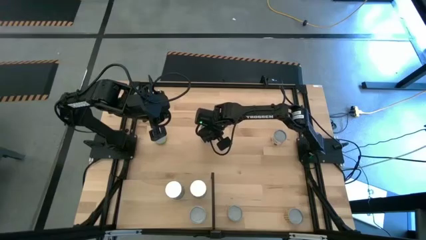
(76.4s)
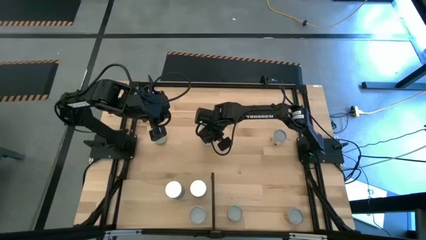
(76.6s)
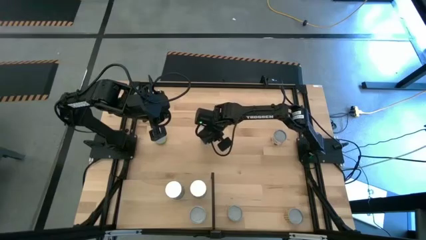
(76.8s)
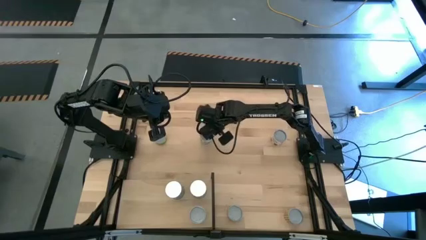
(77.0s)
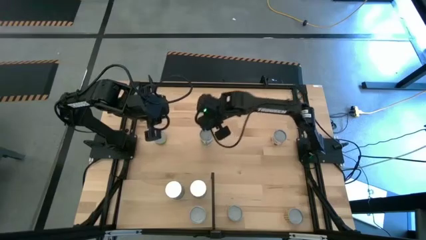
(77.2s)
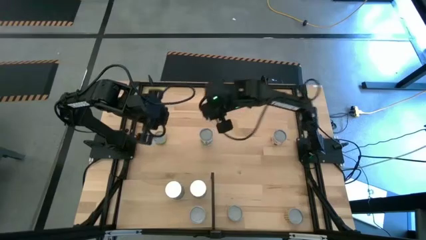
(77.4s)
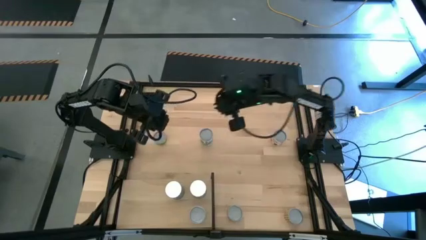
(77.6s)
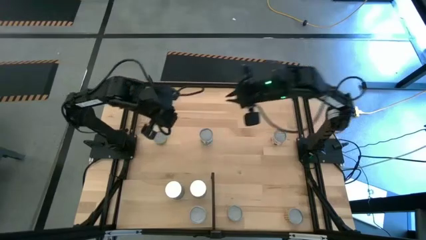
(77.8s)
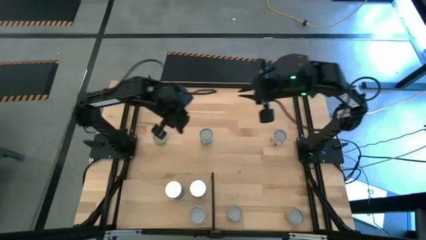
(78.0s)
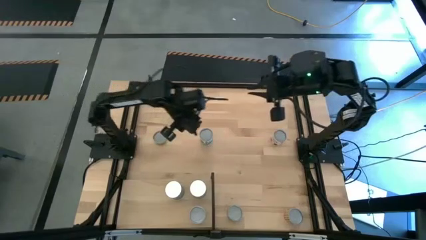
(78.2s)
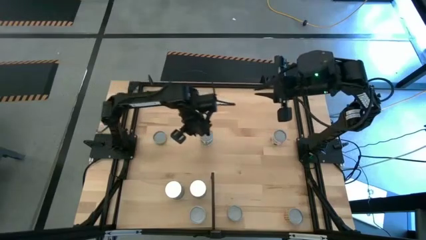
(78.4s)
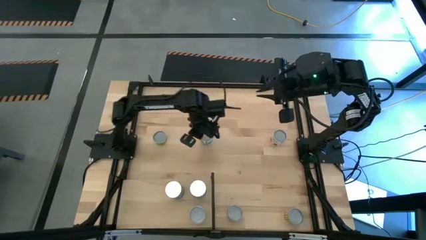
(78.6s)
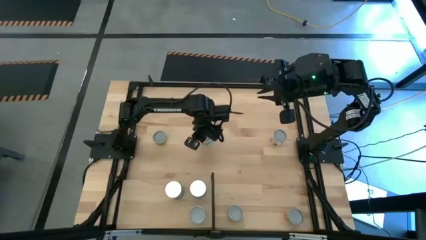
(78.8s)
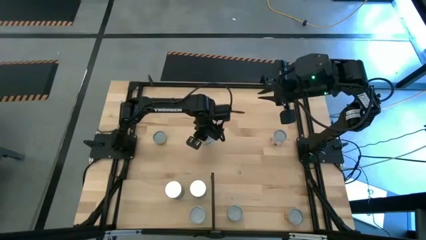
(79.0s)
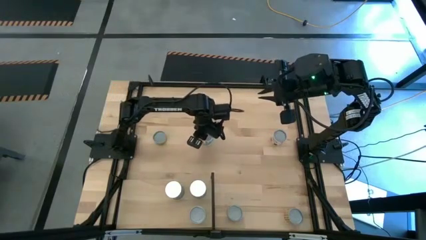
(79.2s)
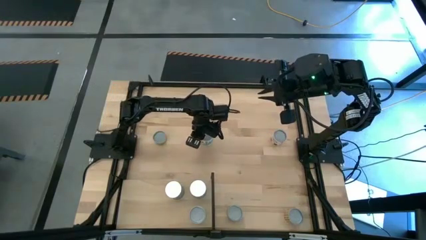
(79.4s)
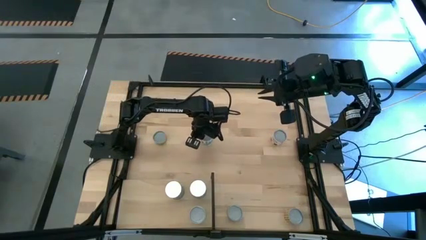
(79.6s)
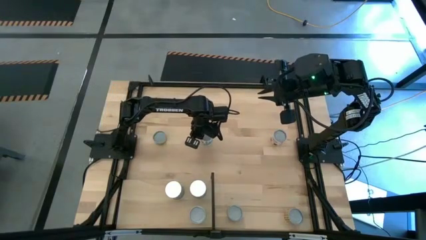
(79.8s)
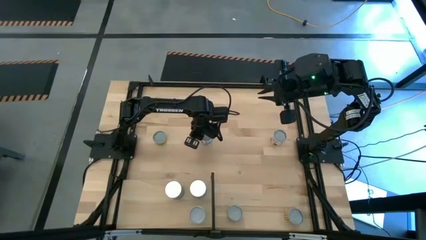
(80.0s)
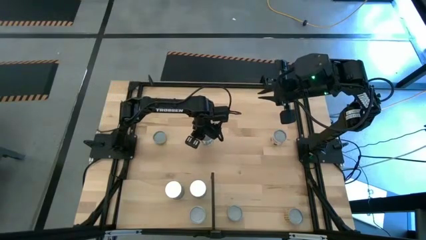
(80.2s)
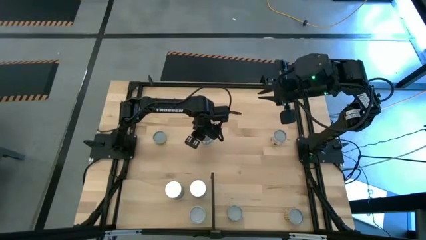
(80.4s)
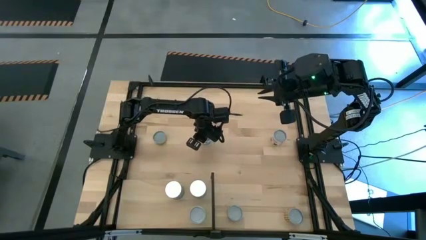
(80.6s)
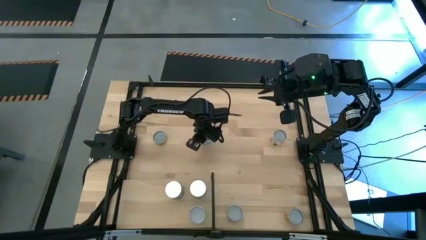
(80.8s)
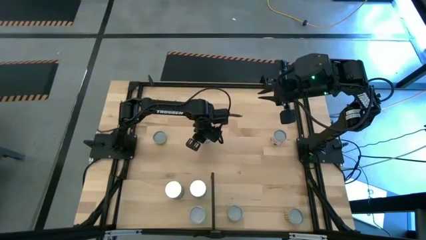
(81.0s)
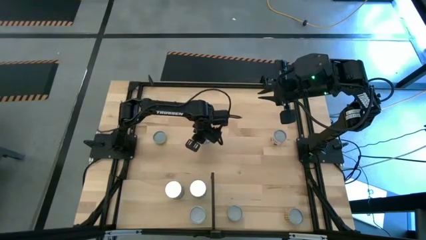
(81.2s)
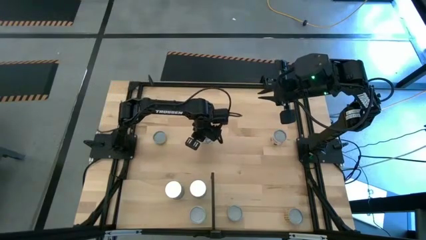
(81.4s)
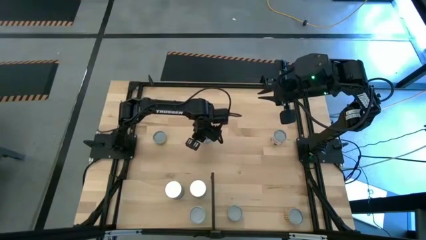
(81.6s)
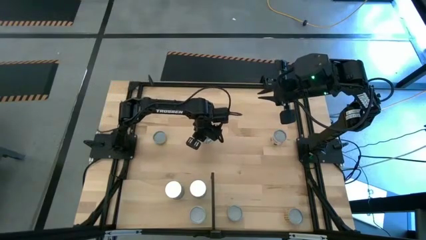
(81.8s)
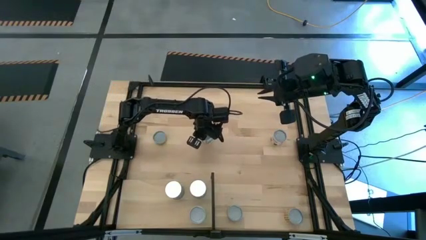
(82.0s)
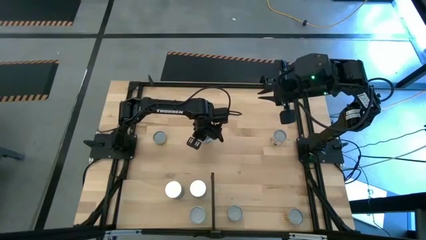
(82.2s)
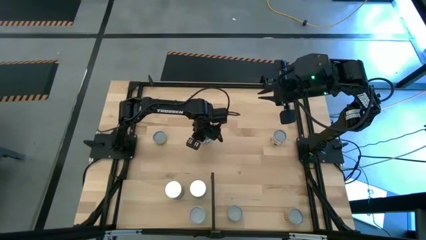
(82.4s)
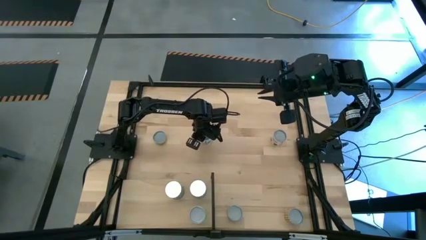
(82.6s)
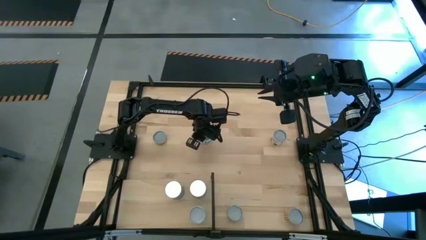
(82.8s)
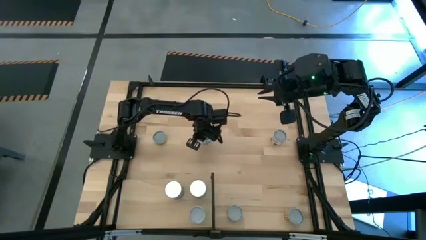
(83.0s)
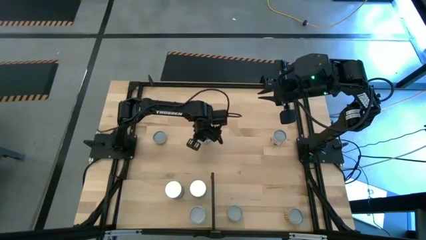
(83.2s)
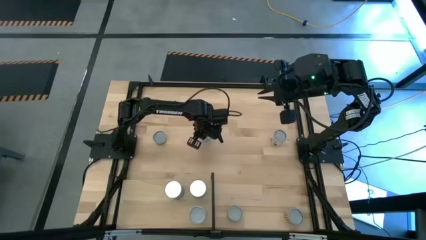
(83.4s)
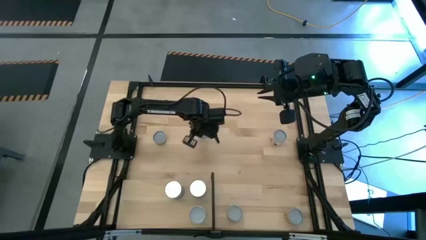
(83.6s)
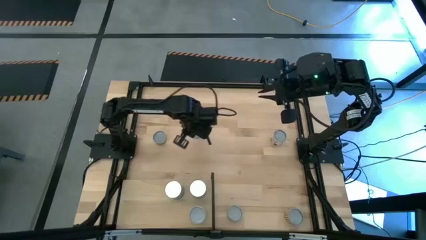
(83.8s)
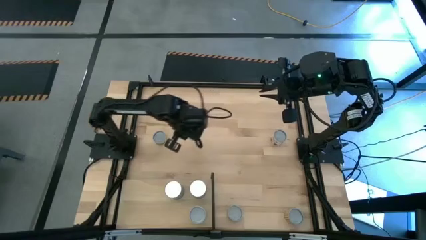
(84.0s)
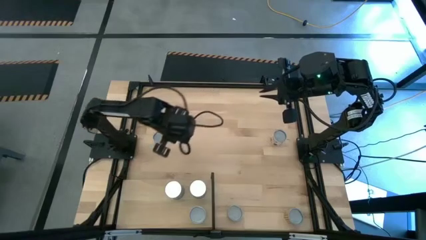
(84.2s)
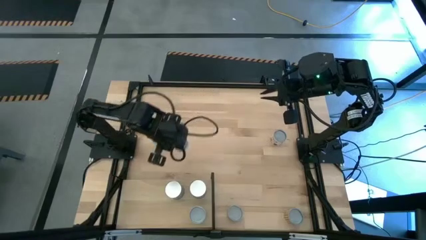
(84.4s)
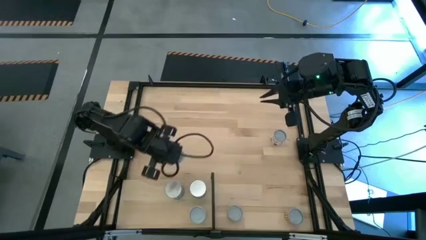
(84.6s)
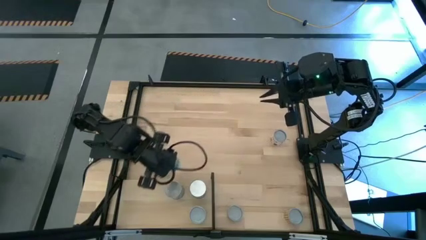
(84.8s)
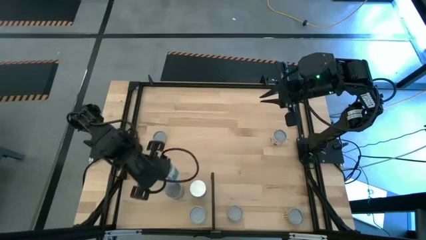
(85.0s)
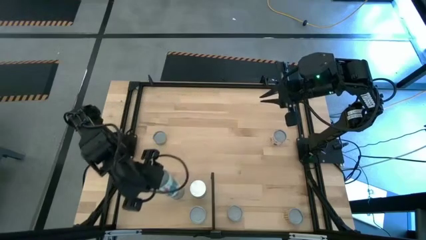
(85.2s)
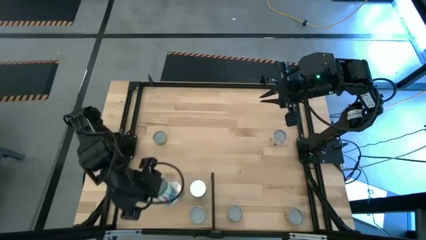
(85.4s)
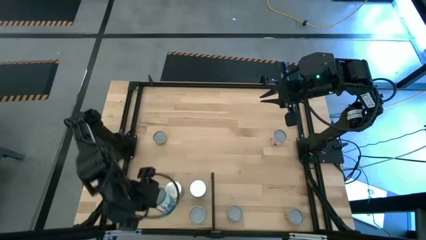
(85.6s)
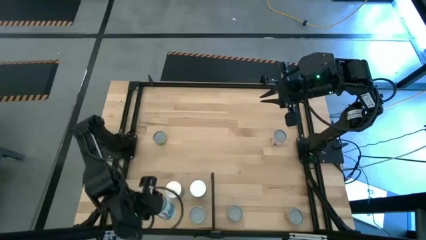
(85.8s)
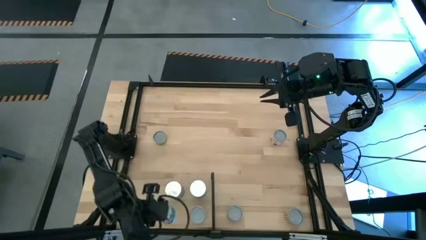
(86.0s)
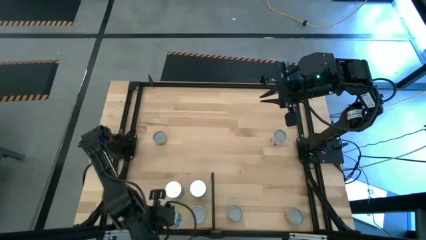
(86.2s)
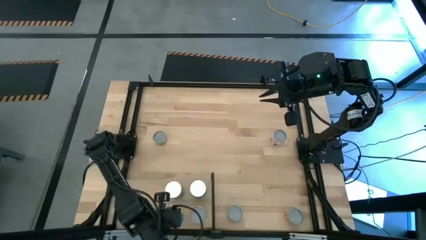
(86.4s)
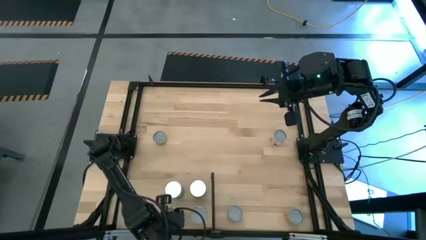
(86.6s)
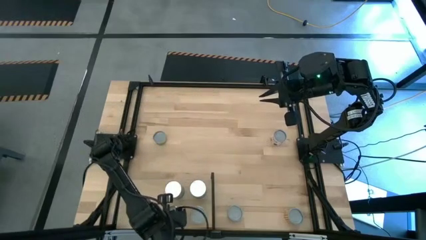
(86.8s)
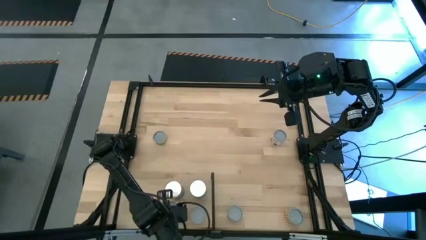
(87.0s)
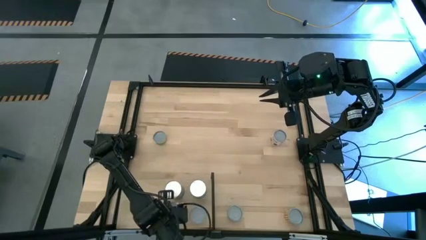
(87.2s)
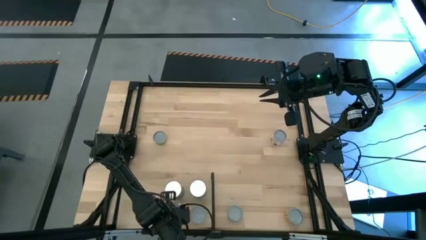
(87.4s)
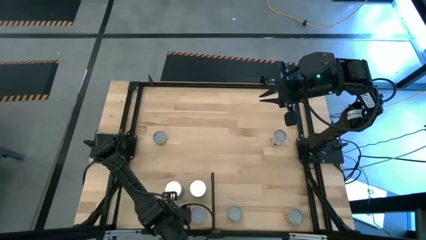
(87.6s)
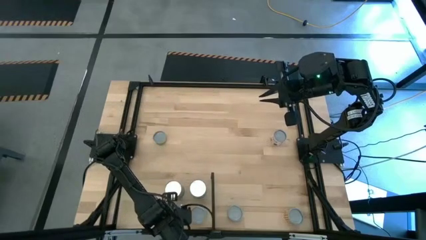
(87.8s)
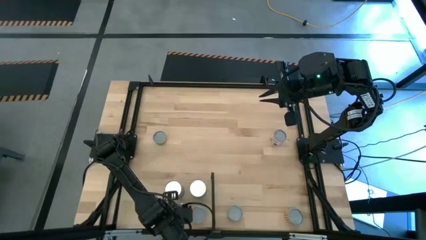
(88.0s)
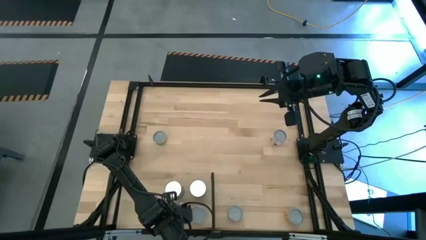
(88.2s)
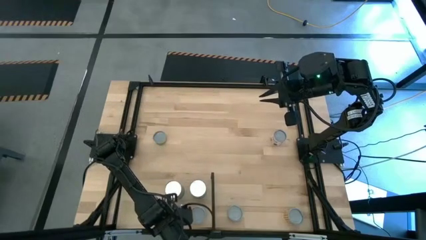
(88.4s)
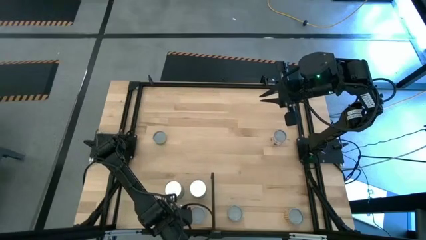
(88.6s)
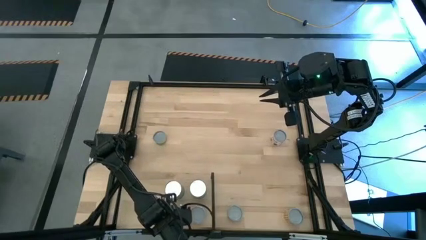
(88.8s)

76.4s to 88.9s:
Task: Pick and place cans onto a shelf
Put the canned mixed veggies on the shelf

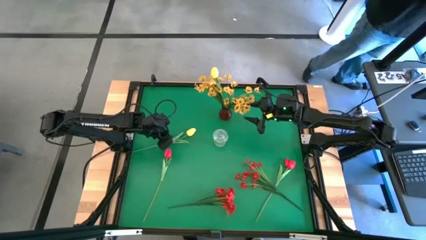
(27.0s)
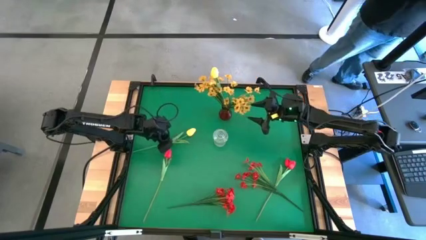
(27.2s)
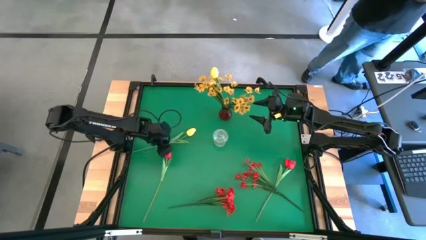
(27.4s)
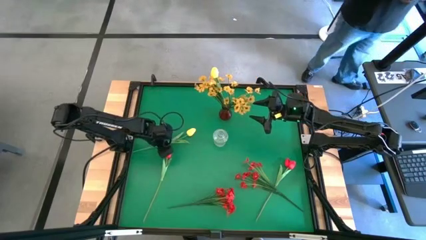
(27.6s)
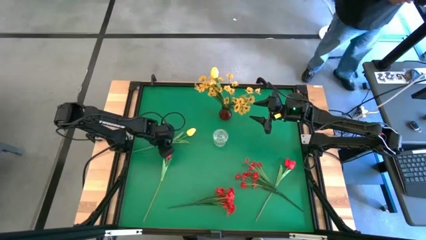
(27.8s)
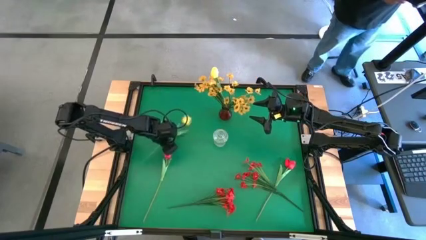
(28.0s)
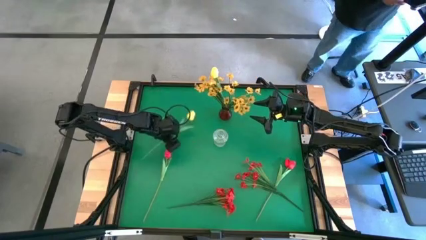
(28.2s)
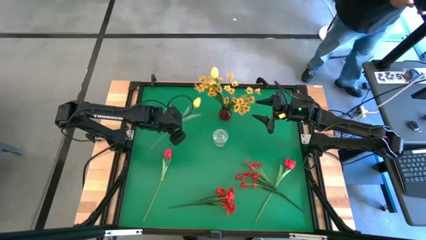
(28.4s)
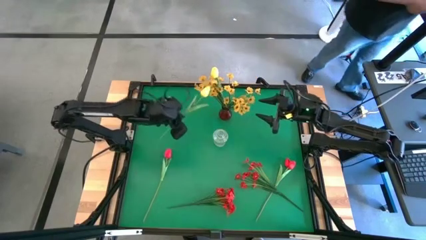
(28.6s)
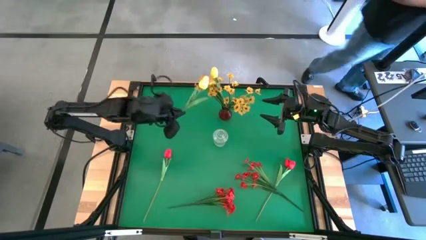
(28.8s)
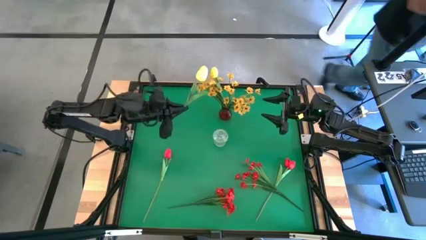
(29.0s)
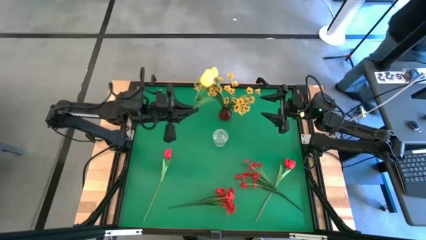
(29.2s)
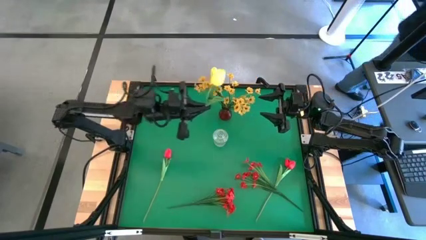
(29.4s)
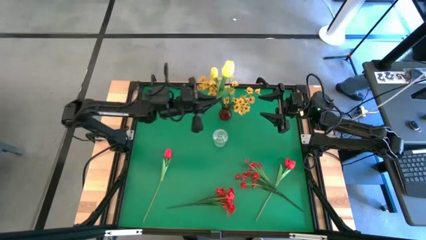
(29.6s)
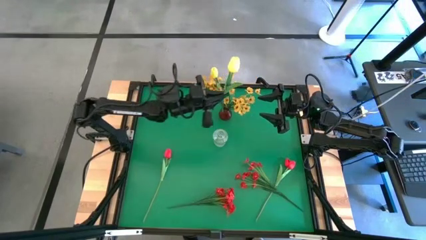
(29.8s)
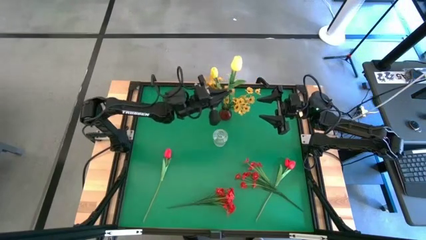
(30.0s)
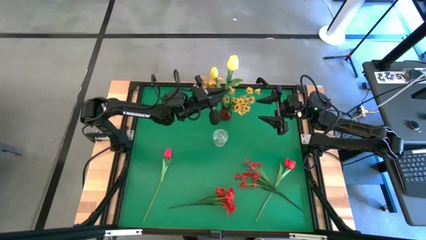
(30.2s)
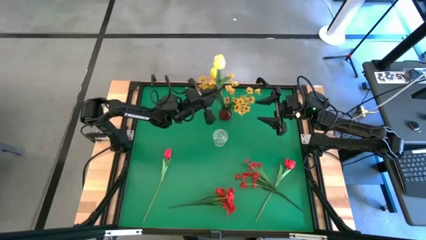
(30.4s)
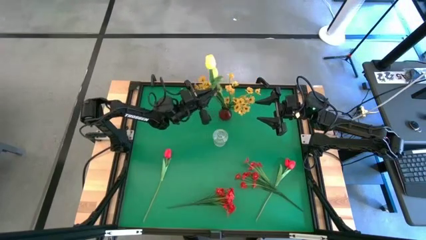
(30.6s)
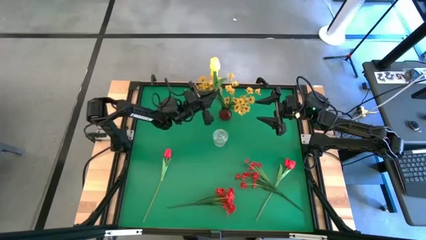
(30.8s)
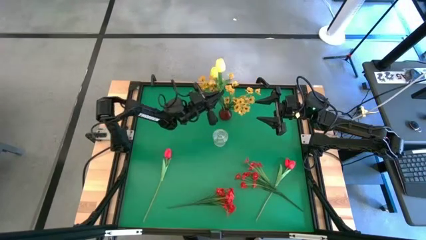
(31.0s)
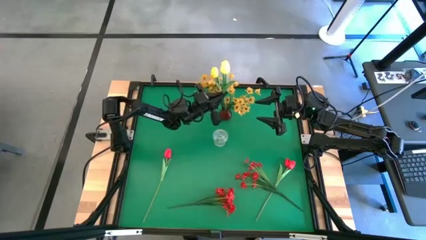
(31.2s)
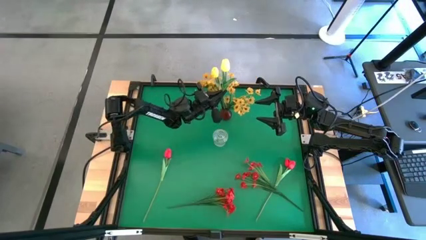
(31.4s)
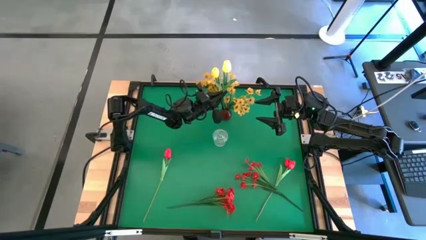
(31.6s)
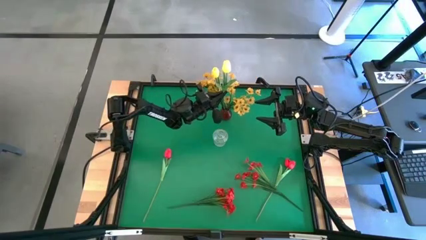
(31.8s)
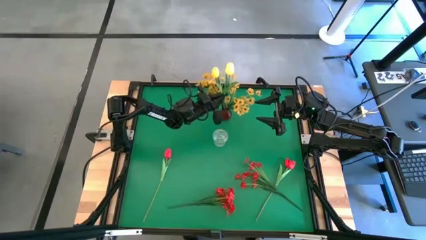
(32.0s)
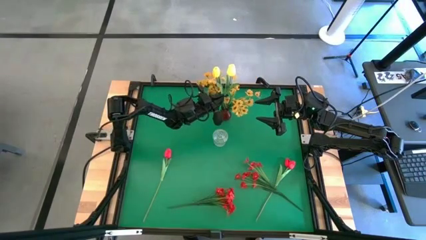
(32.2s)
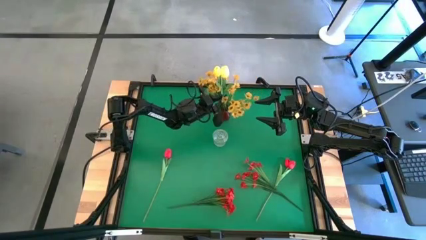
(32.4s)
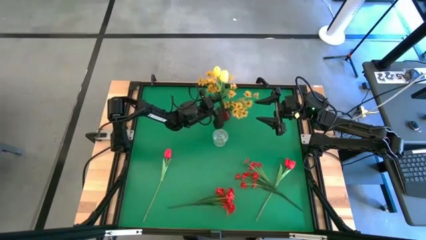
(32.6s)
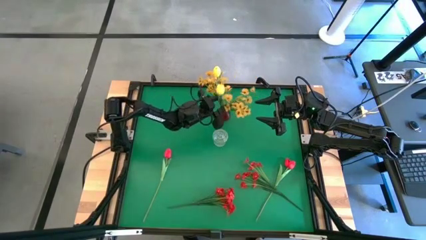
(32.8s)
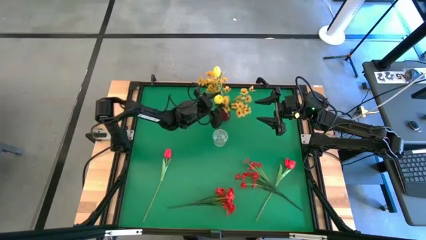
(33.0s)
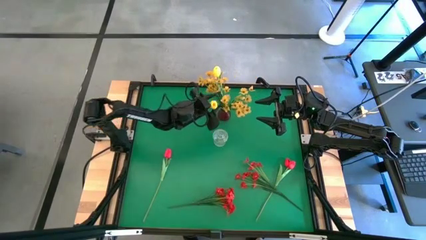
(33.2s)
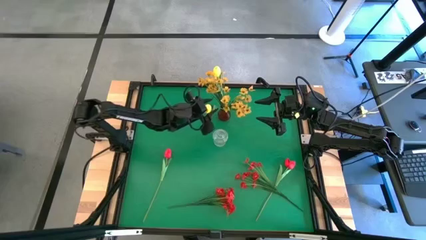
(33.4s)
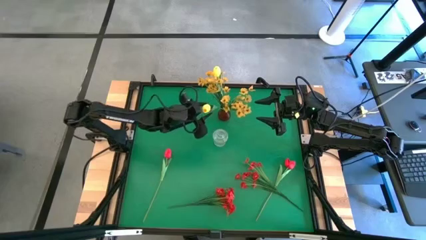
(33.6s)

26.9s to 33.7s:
Task: Sort flowers into vase by color
Put the yellow tulip into the red vase
